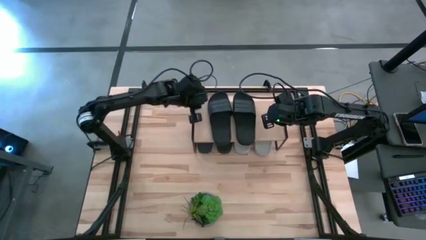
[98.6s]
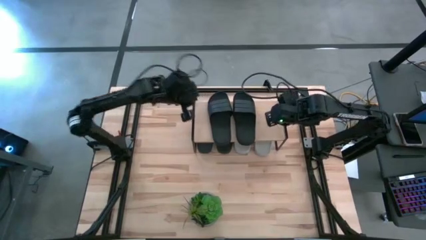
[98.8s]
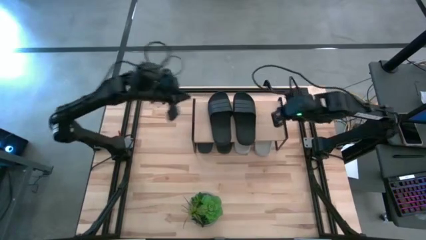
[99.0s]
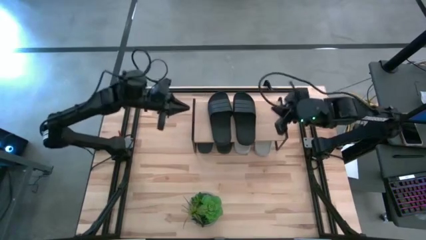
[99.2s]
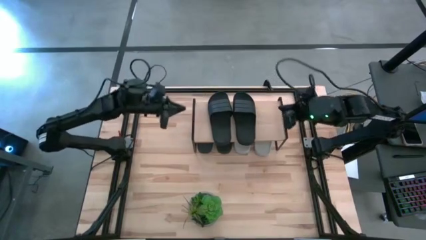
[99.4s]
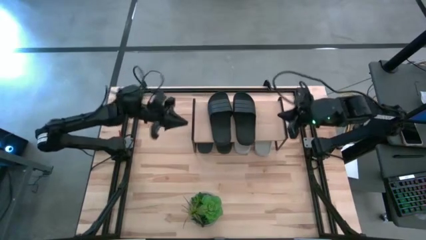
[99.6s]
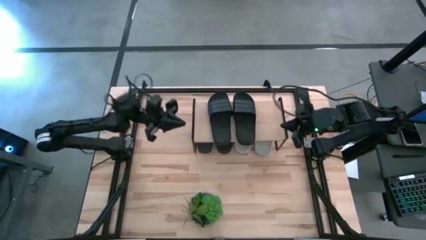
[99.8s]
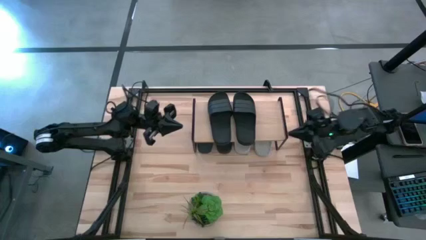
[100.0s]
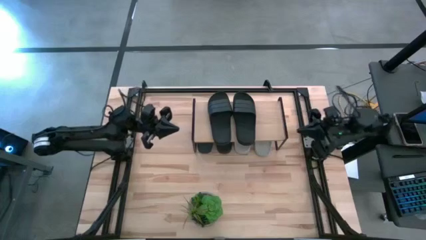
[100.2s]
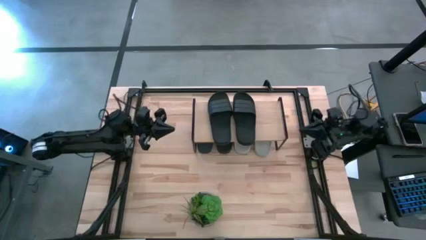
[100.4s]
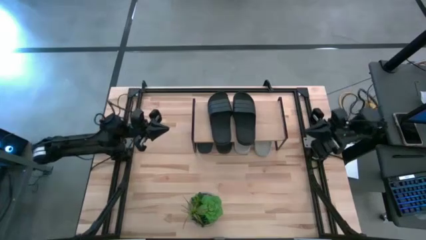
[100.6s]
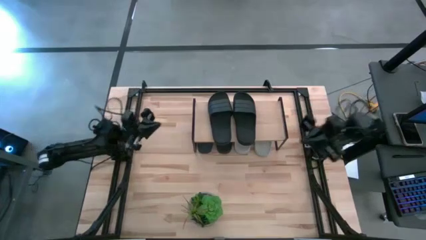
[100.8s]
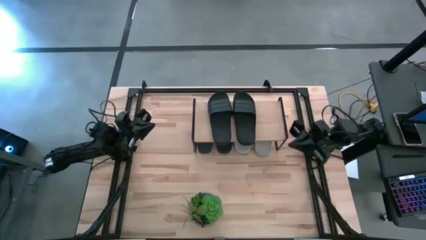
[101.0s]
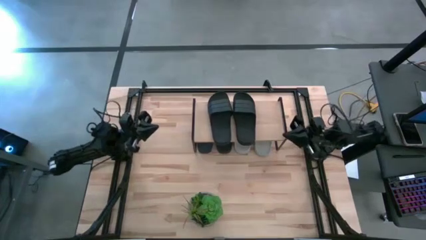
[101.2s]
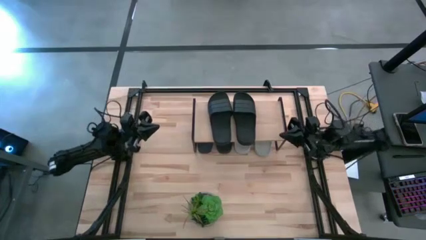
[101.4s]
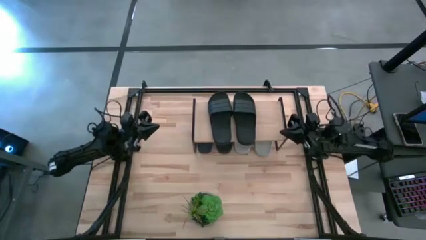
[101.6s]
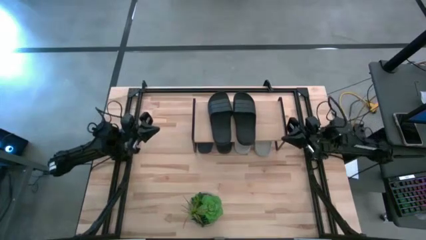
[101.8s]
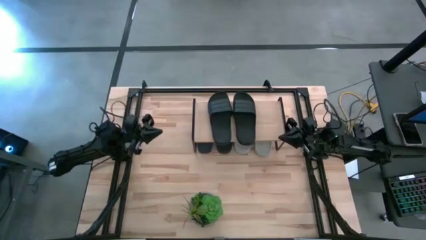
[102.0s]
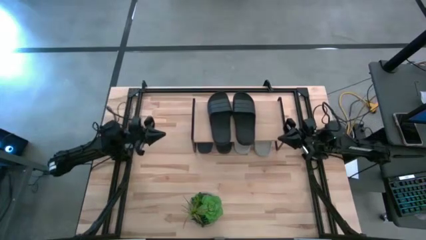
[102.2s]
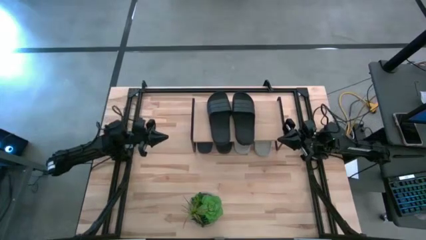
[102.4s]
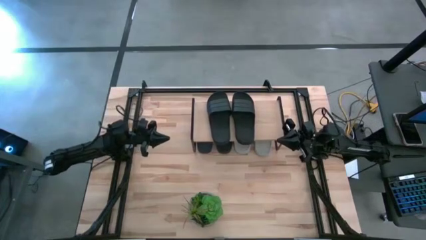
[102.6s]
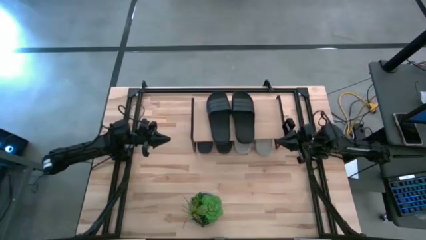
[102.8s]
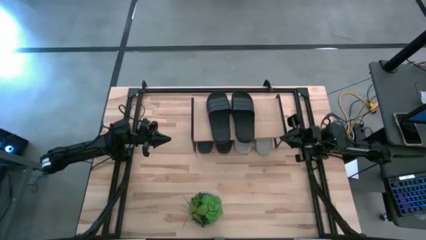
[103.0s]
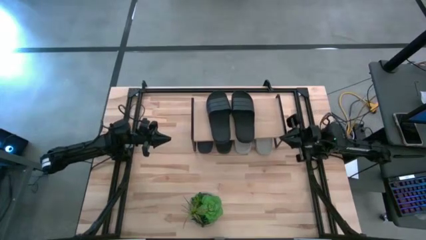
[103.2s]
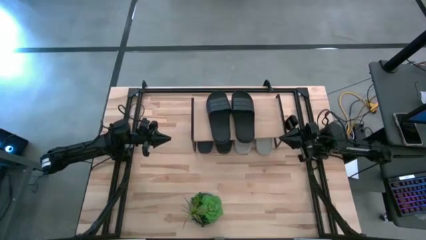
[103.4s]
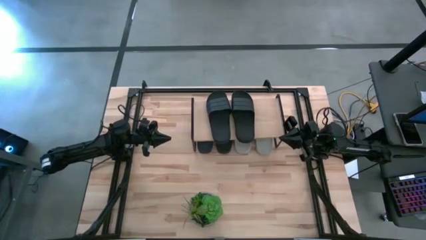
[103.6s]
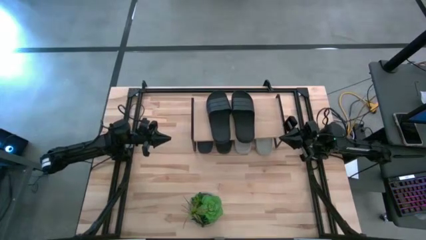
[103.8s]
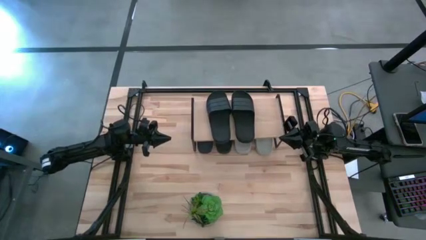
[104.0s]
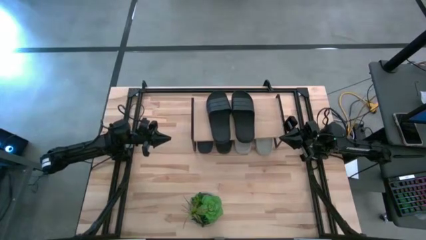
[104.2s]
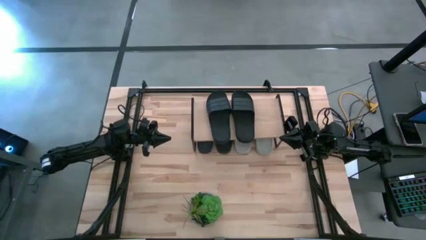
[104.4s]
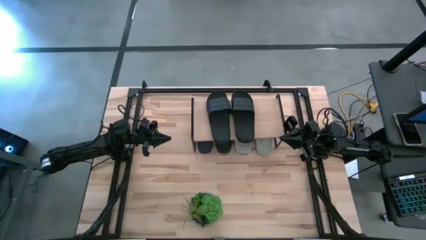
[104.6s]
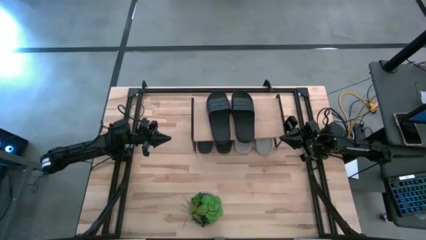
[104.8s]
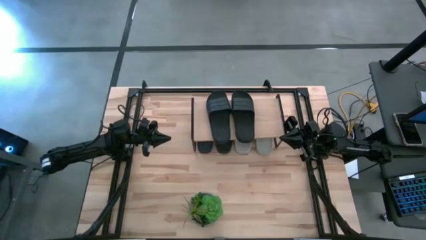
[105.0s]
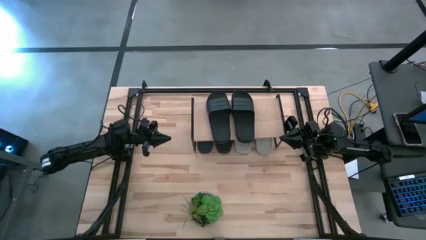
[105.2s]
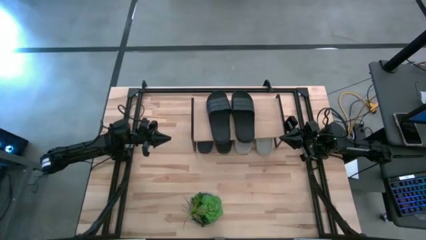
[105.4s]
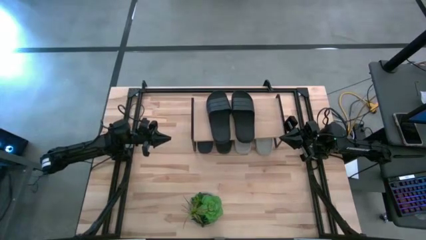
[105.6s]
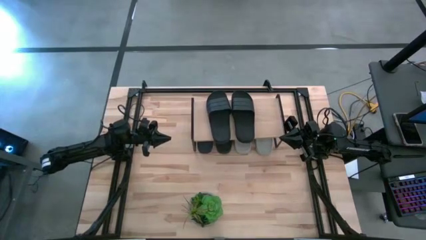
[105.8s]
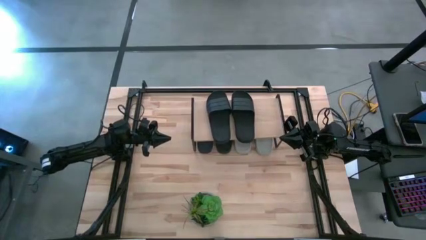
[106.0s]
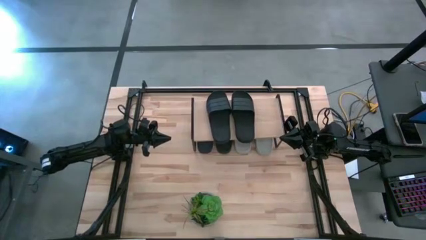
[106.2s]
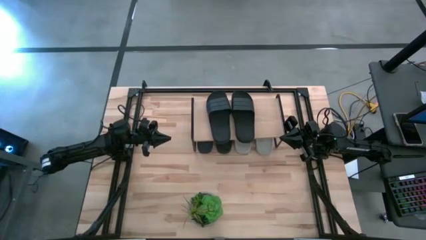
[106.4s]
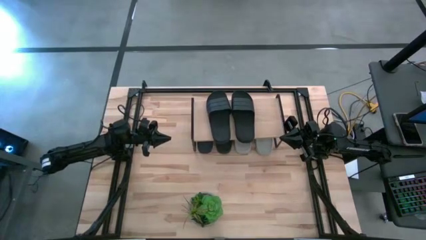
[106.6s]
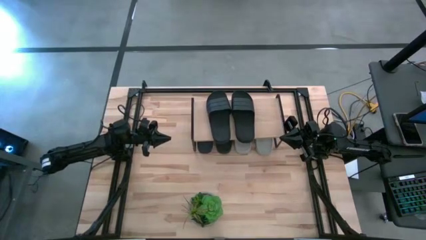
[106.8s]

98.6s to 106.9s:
Task: Pick and place slides into the shelf
Return to Home Position

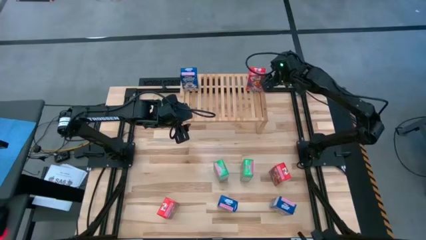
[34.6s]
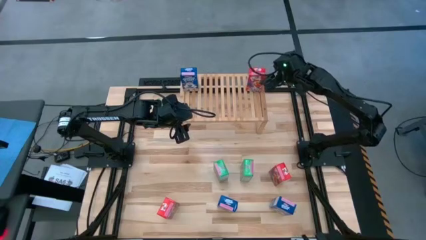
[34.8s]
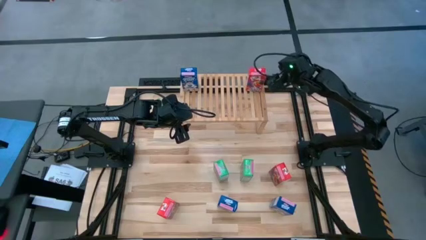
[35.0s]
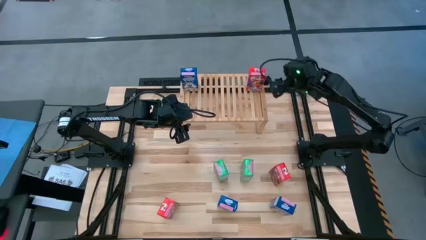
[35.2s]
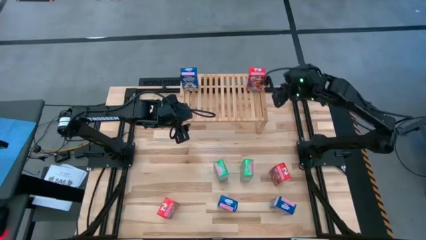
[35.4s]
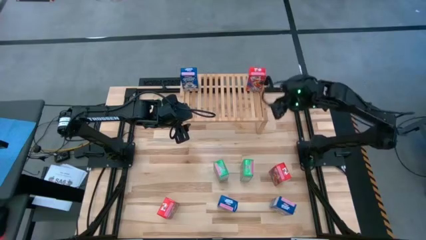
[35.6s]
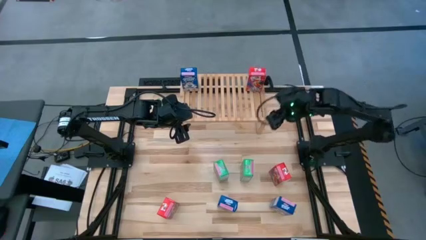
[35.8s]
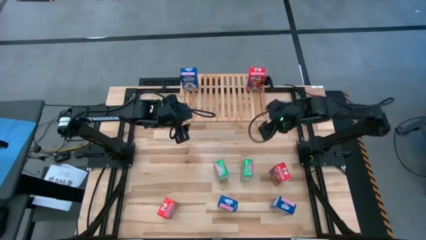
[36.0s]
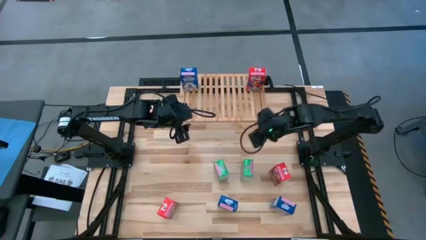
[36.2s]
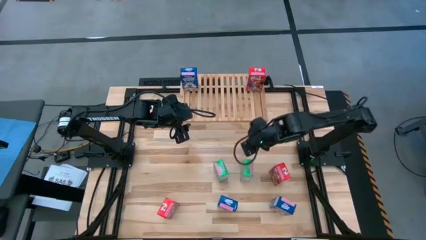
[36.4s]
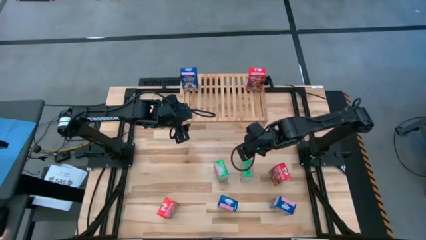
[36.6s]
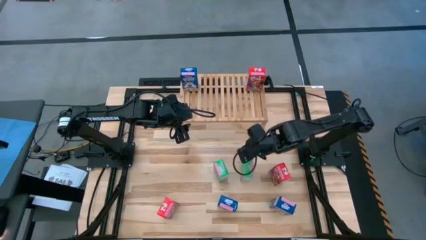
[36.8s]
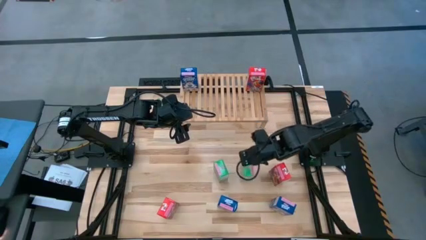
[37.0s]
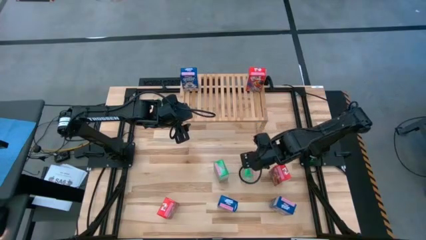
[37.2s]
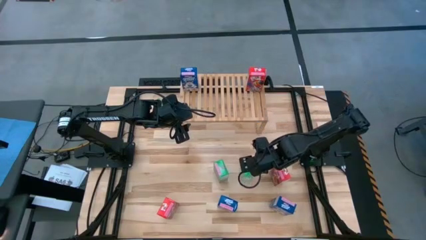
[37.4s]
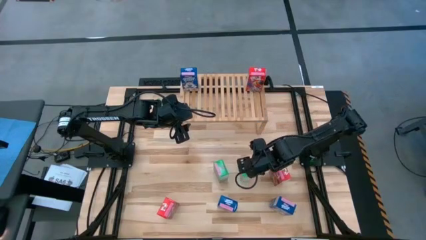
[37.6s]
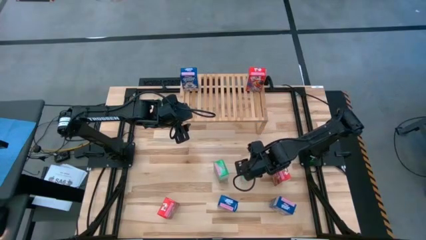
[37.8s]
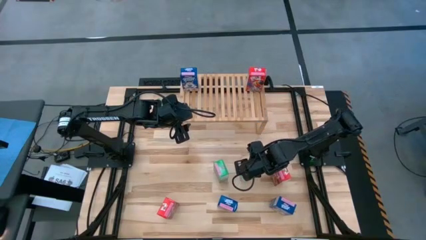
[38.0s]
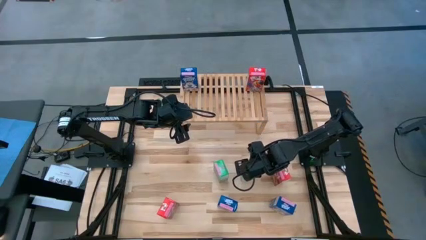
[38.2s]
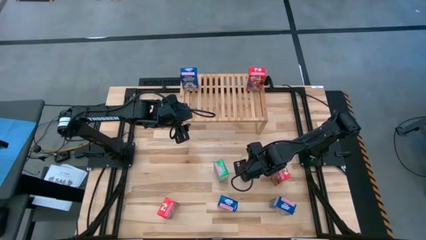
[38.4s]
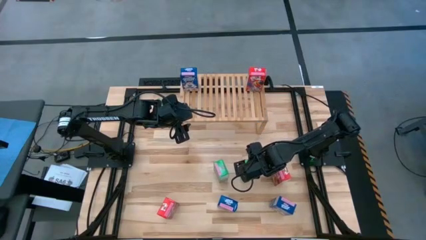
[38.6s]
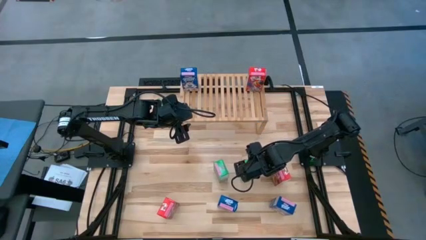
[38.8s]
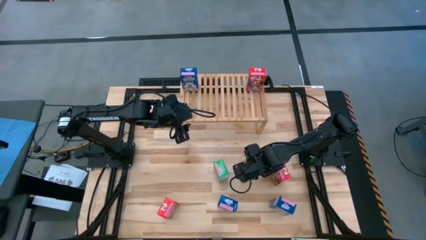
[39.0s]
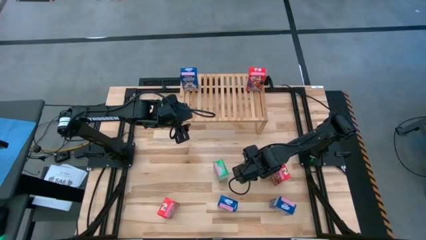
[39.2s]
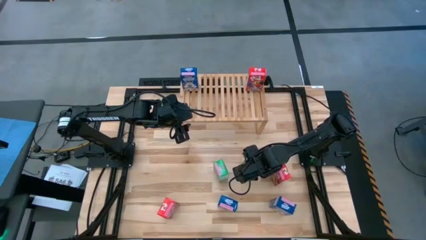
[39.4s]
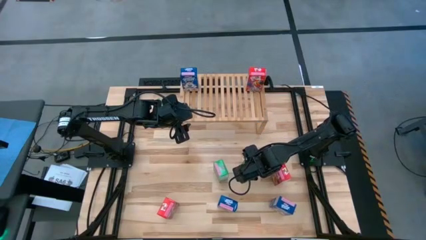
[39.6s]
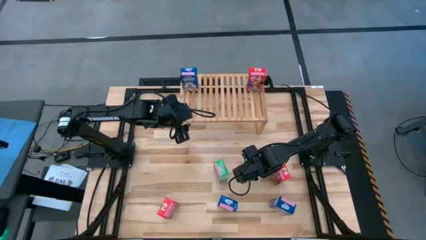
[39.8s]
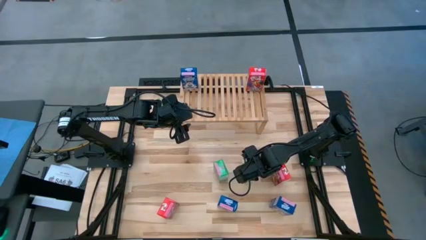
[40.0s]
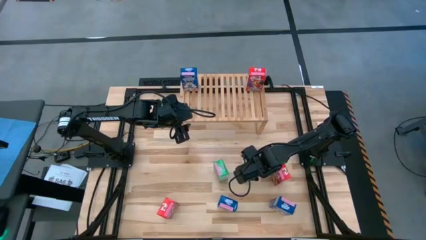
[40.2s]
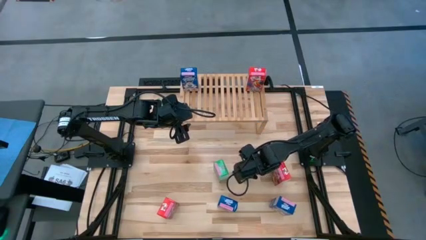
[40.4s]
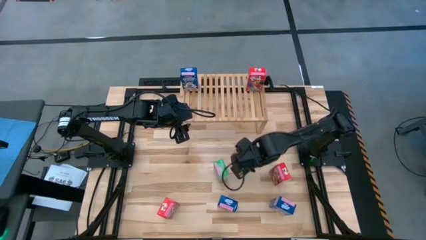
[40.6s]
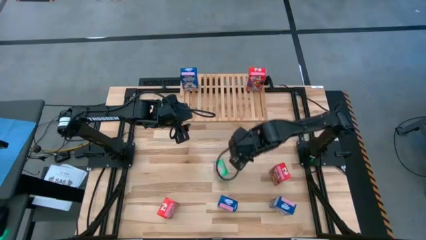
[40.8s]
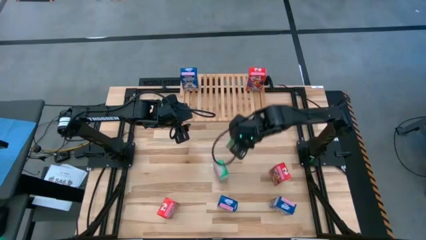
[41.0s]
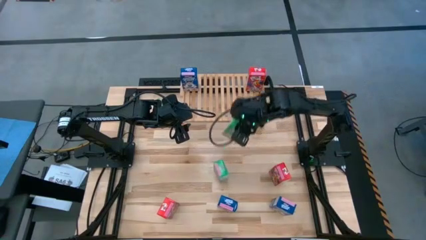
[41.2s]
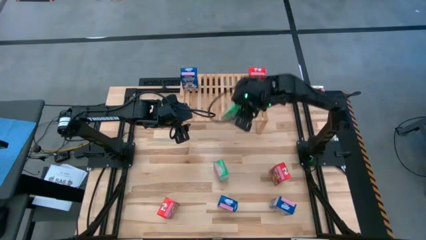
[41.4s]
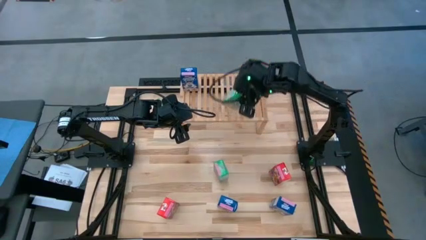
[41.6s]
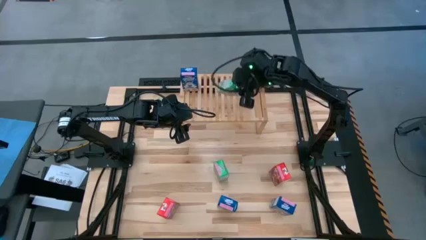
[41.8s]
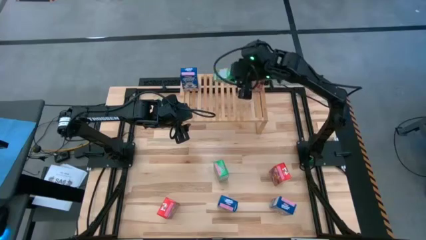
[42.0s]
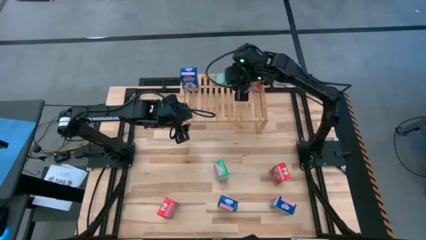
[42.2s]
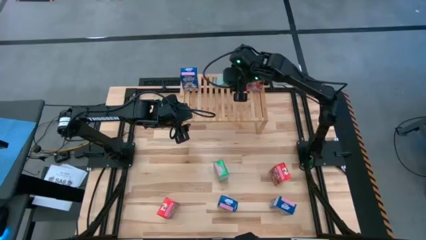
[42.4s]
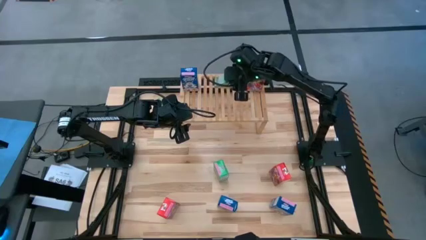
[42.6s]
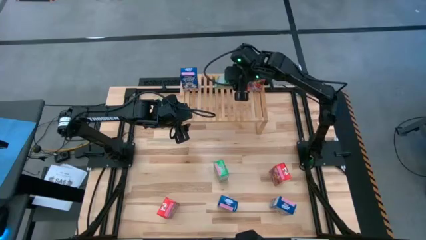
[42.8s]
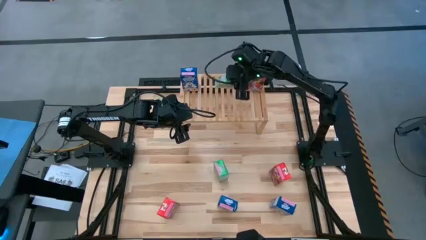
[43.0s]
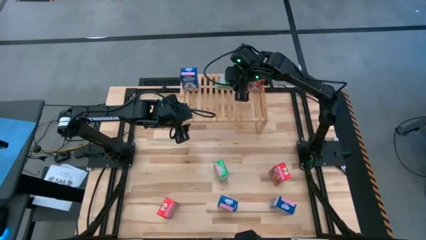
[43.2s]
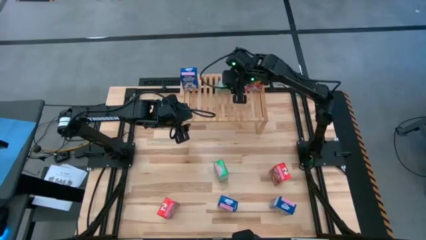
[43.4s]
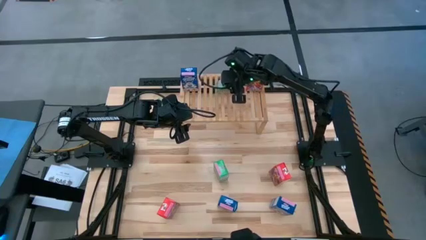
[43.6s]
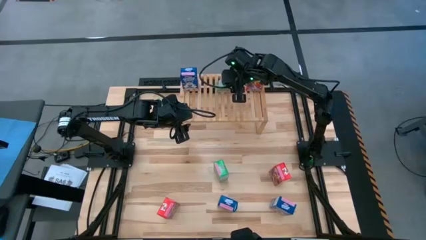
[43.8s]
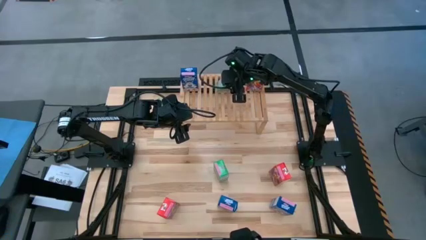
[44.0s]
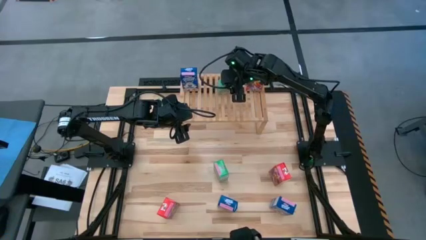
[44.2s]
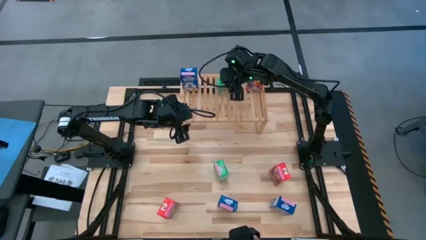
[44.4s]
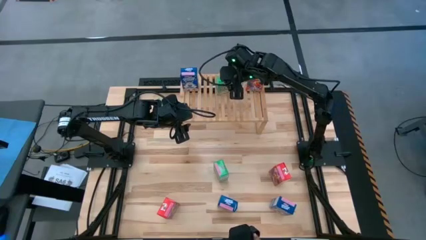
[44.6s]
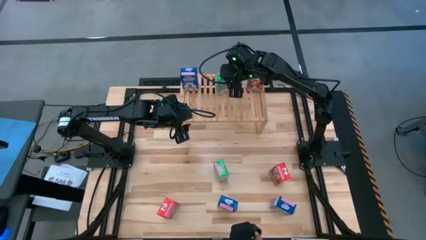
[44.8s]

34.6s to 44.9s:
Task: Stack cereal on shelf
Put the bottom right green cereal box on the shelf
